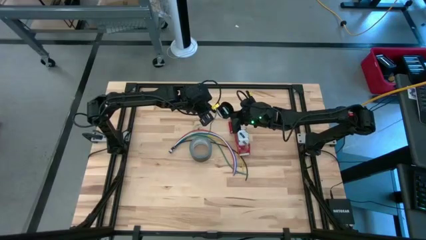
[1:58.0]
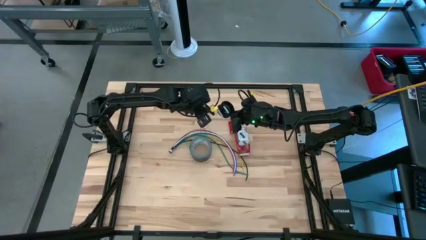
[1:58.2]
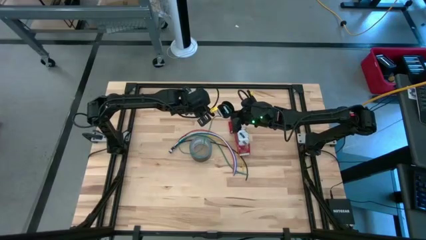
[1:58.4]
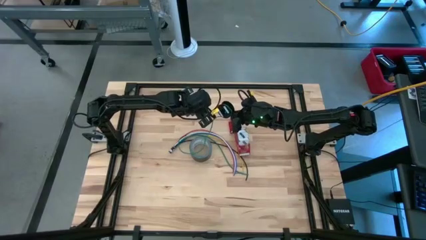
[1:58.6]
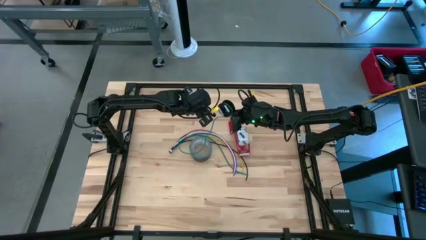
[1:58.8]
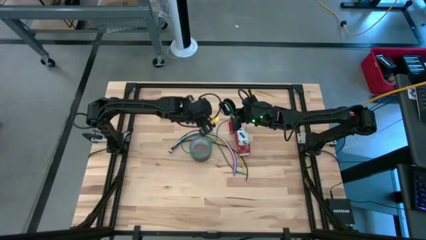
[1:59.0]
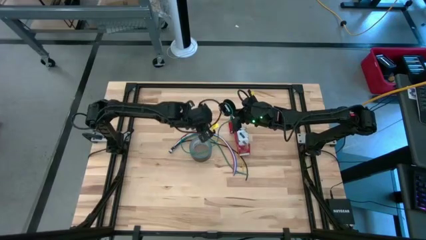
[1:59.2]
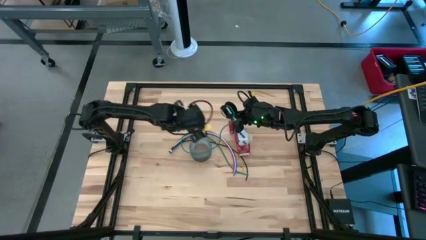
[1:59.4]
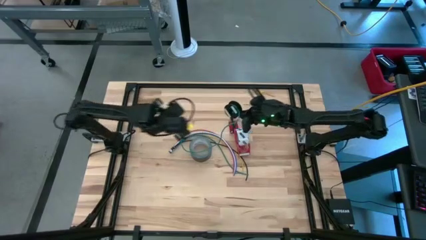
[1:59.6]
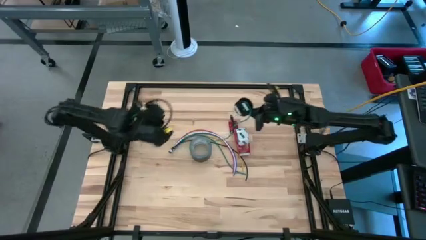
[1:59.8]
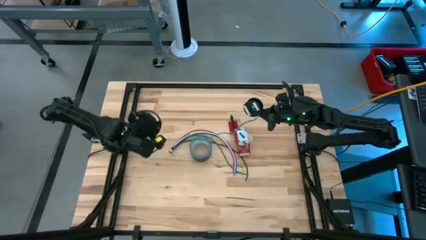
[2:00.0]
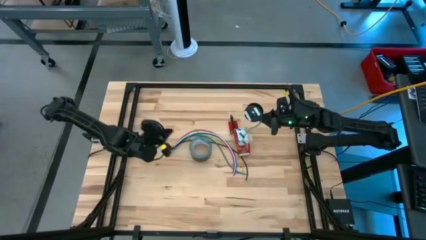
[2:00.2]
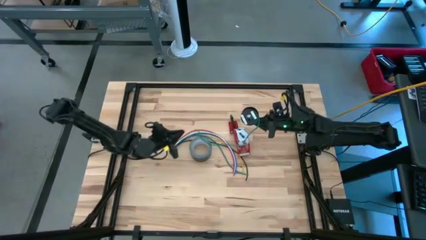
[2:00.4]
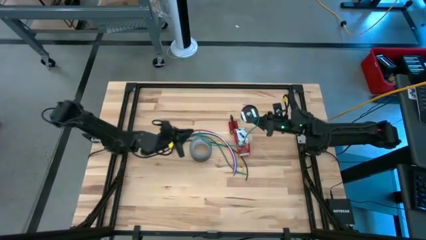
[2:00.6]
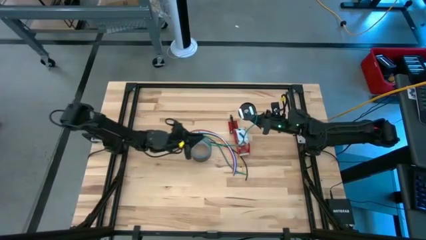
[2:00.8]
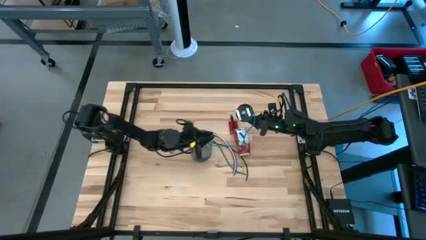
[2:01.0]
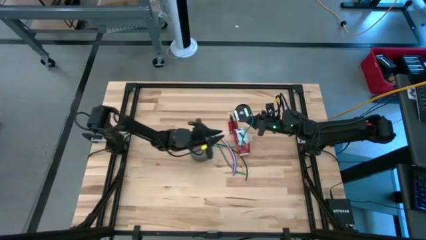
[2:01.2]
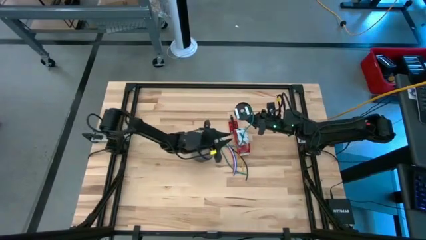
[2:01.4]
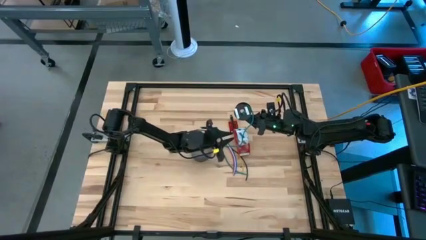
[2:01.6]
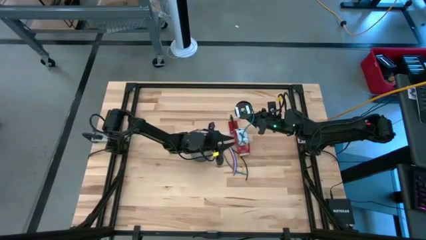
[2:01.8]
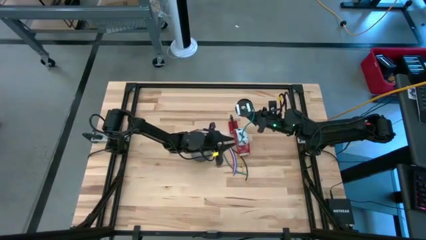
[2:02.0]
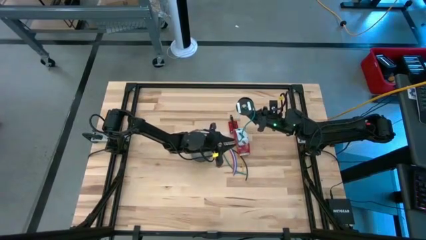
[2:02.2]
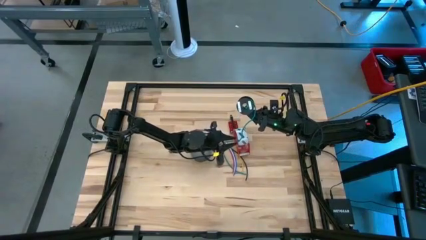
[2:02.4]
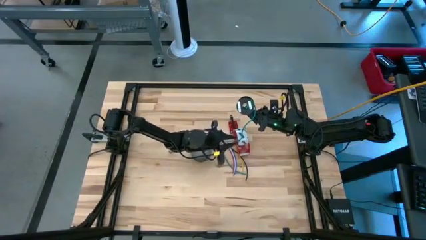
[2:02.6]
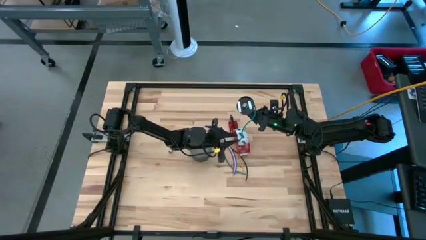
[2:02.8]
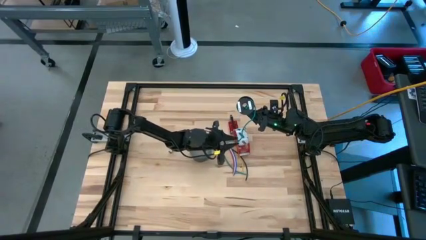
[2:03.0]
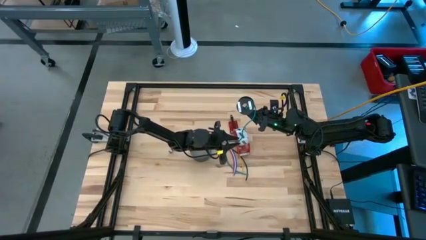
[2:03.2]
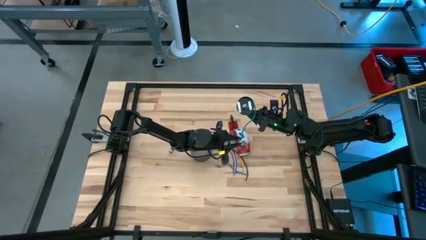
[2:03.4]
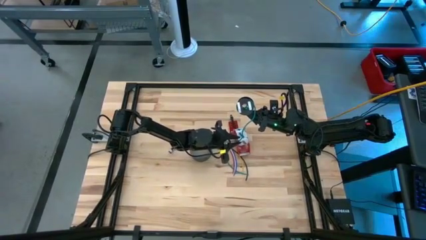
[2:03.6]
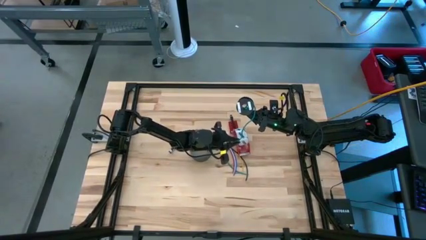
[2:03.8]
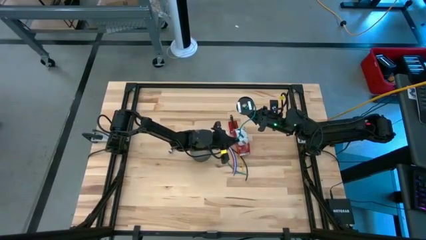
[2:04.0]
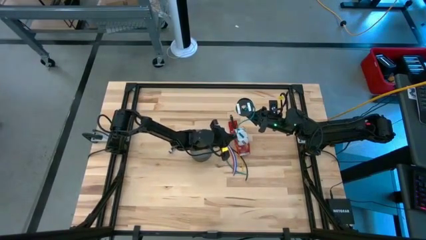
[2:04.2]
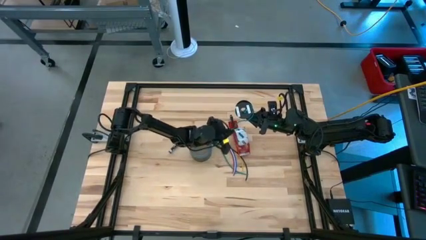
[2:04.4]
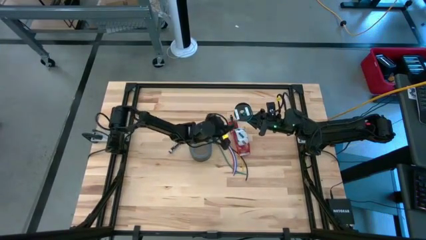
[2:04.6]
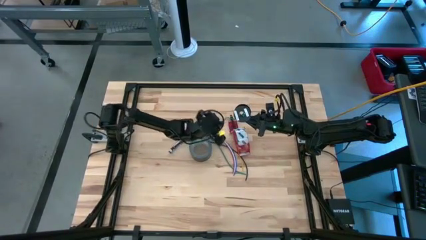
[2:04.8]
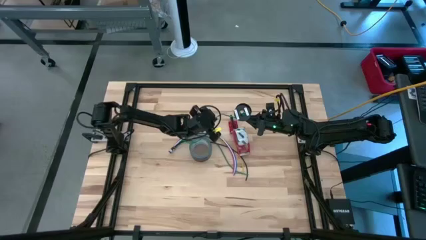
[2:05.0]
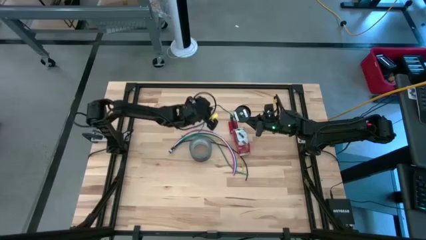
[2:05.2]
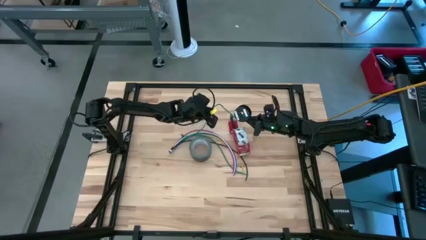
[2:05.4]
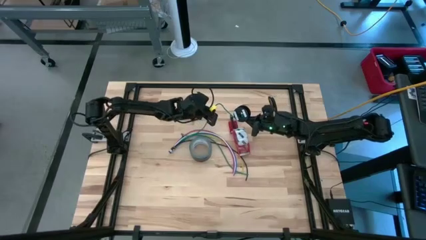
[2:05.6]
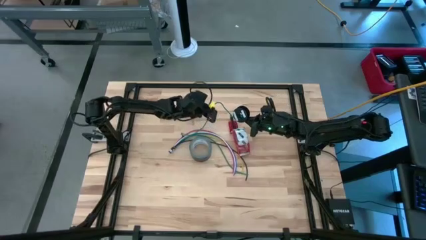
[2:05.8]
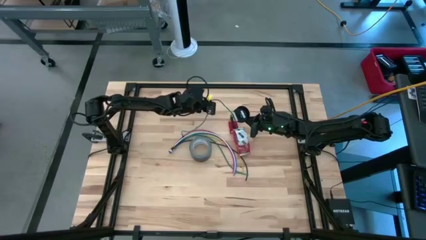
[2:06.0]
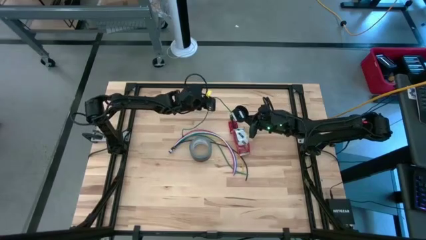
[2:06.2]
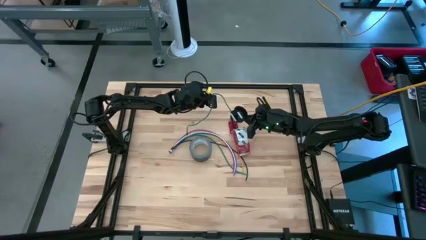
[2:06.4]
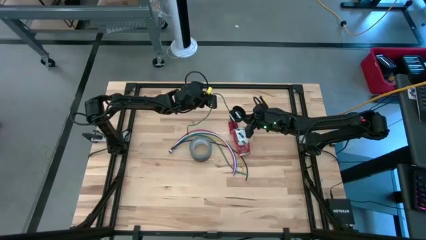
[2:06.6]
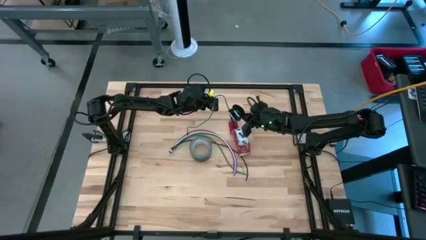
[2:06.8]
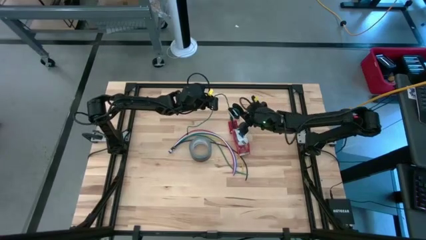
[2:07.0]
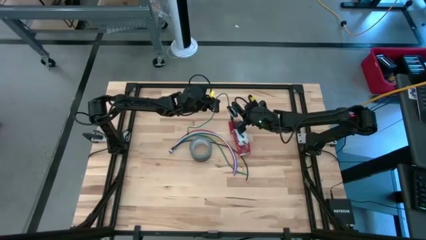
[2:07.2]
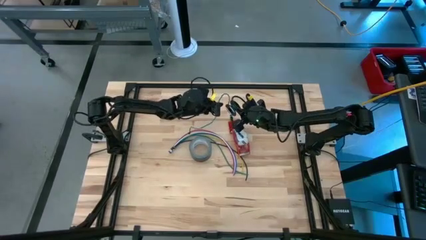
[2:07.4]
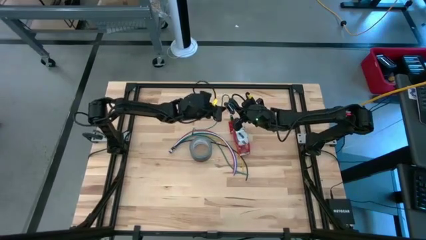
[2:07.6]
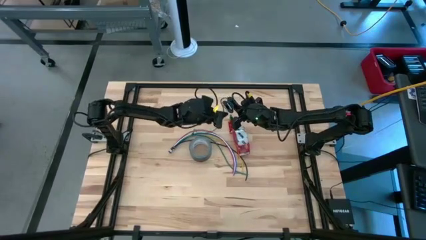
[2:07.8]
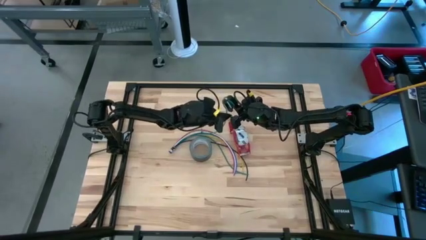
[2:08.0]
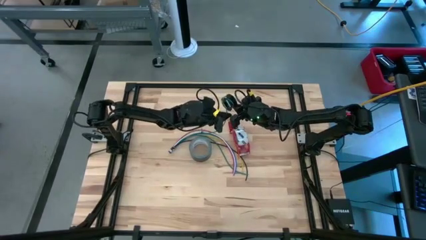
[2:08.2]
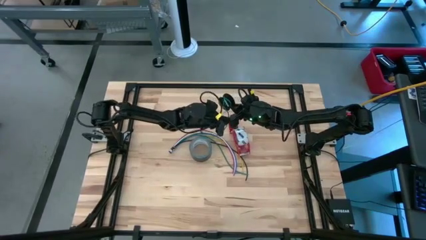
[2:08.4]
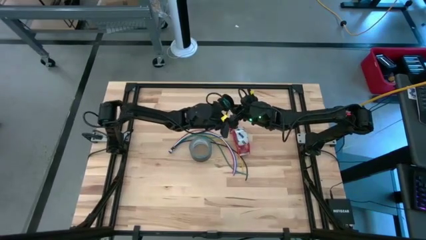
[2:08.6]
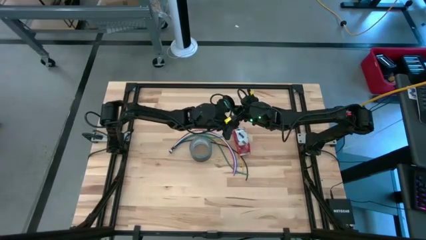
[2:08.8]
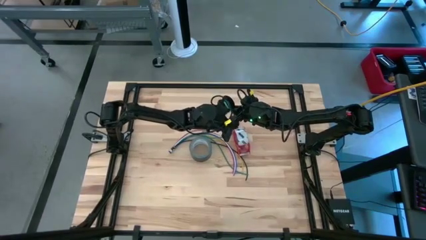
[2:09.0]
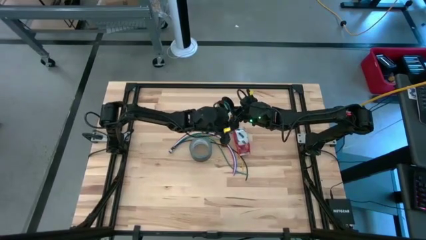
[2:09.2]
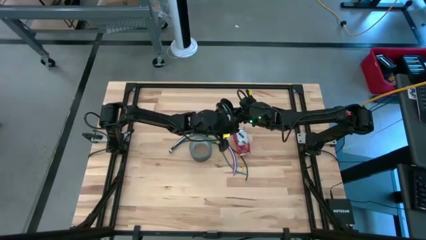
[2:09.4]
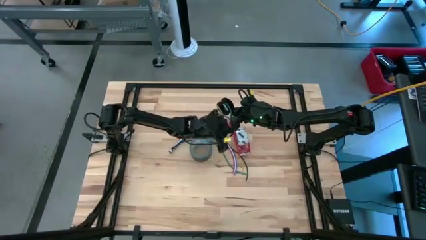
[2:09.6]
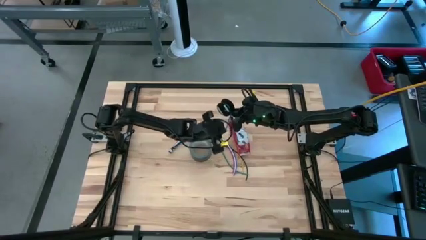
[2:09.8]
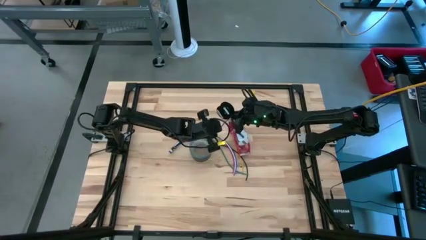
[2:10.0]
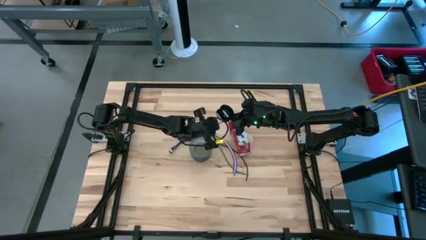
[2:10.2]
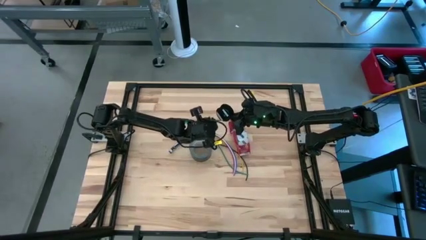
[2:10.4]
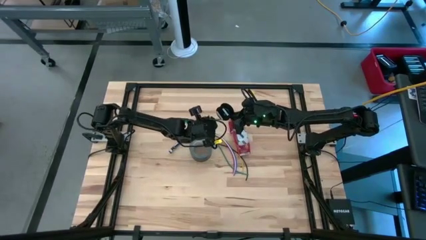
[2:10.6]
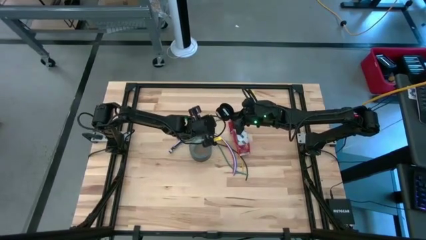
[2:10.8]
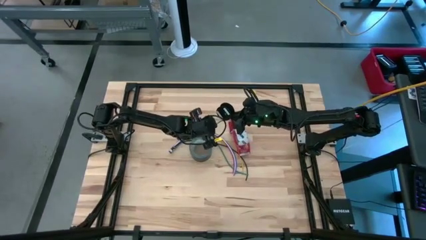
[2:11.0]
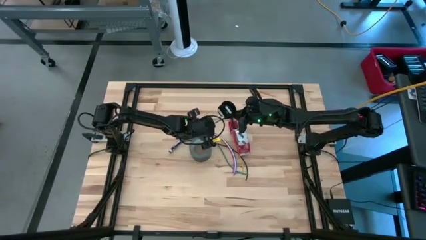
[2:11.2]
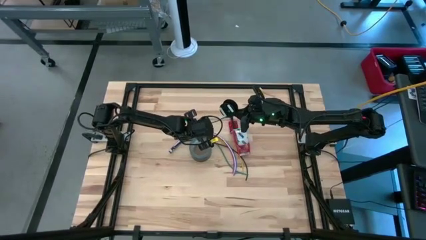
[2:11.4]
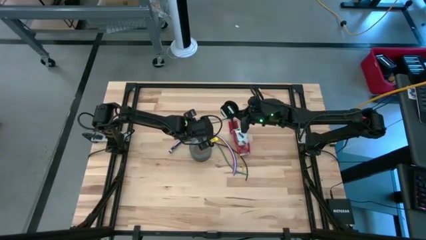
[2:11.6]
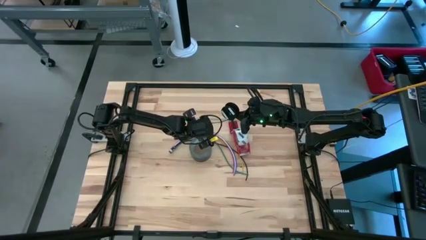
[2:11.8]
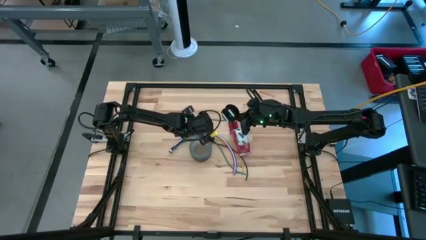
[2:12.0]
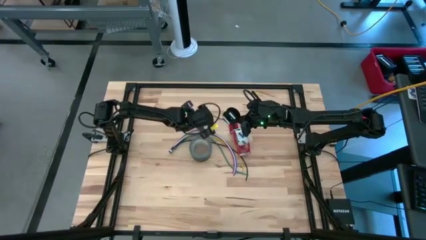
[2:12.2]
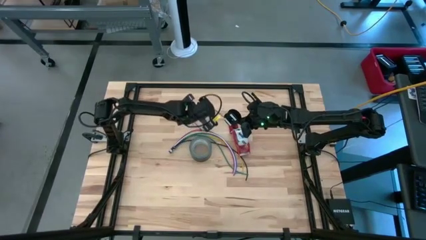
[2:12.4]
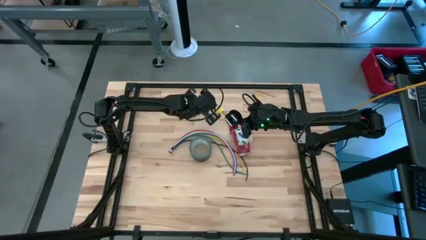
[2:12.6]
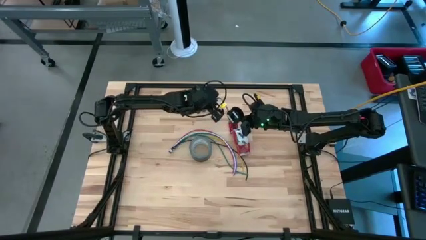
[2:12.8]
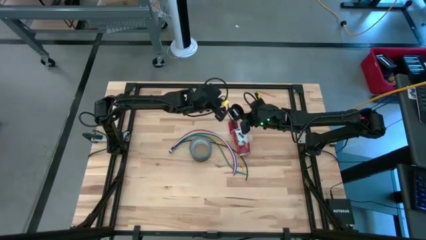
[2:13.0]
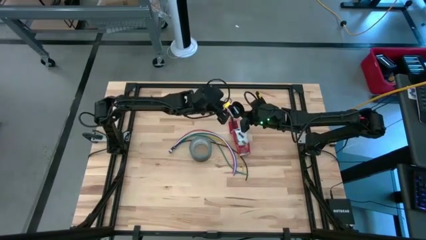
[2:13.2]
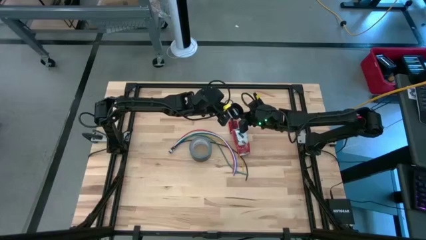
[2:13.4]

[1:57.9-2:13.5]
Task: Coil cords
Coil the green wire into the spool

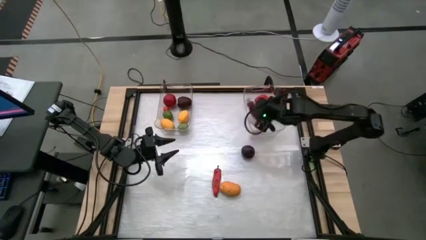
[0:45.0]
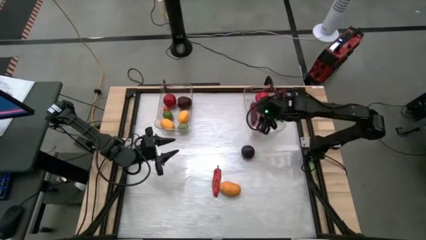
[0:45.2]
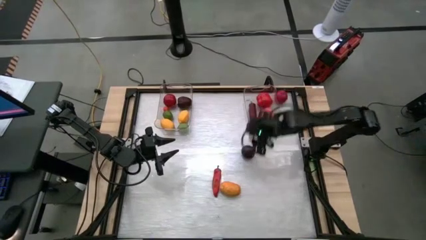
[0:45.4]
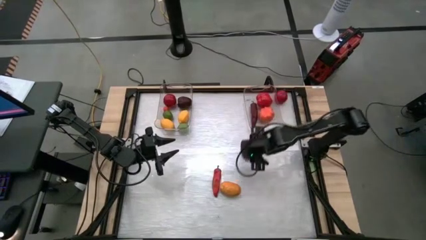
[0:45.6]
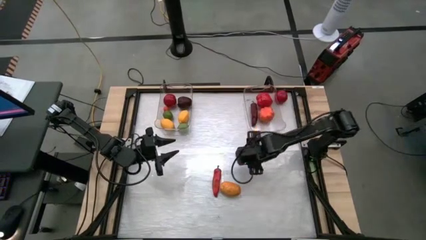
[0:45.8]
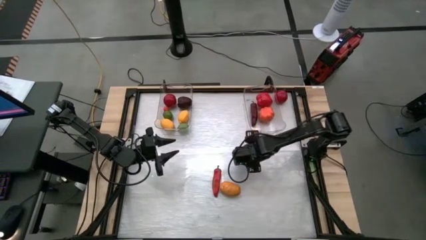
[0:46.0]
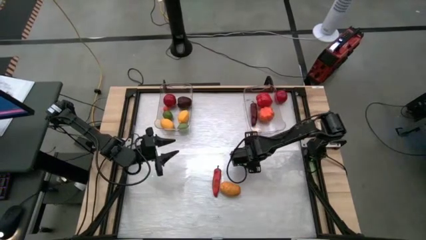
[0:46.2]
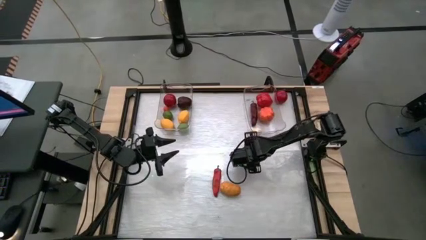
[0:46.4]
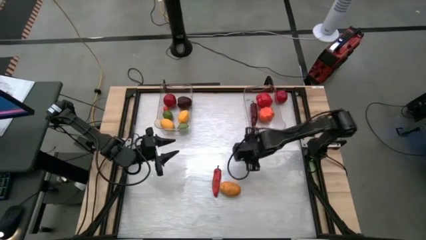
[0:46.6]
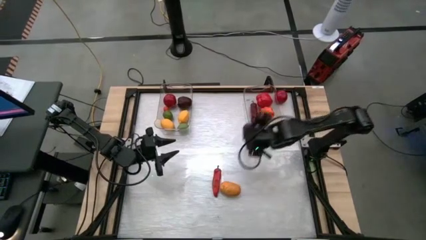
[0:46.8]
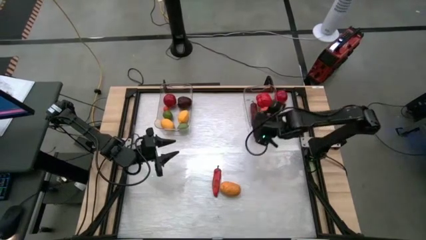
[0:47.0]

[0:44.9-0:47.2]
Task: Sort produce into baskets
Put the purple cabbage into the right transparent bin
